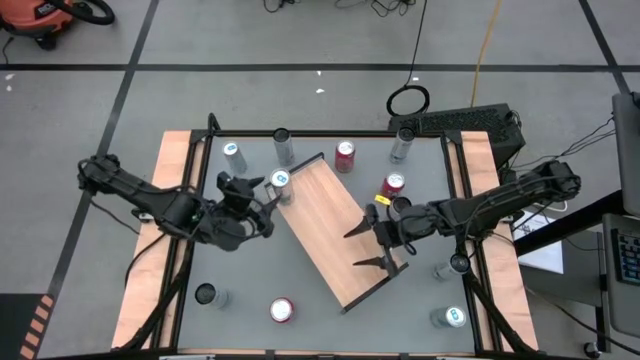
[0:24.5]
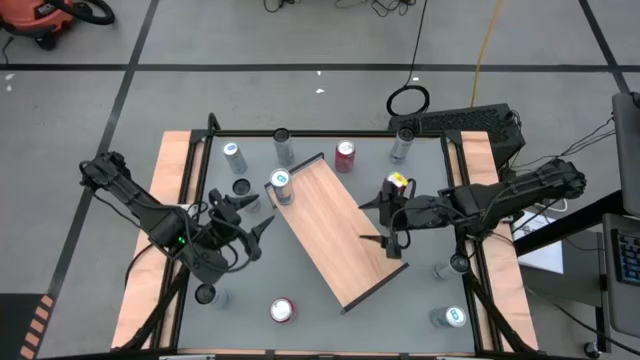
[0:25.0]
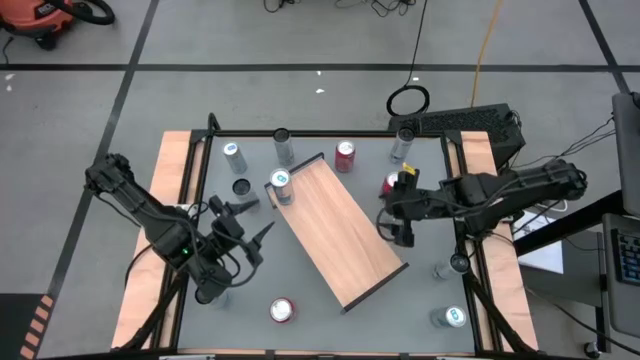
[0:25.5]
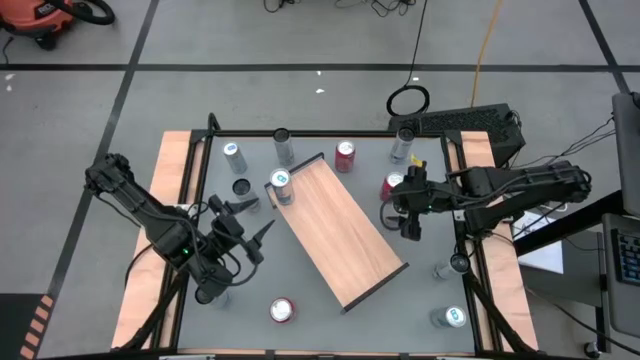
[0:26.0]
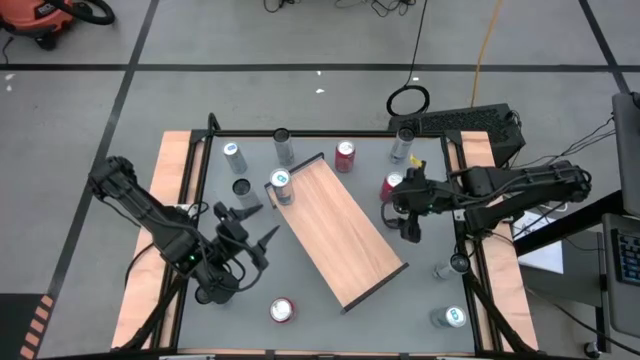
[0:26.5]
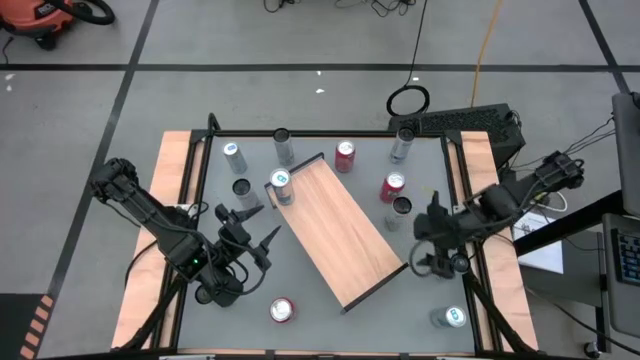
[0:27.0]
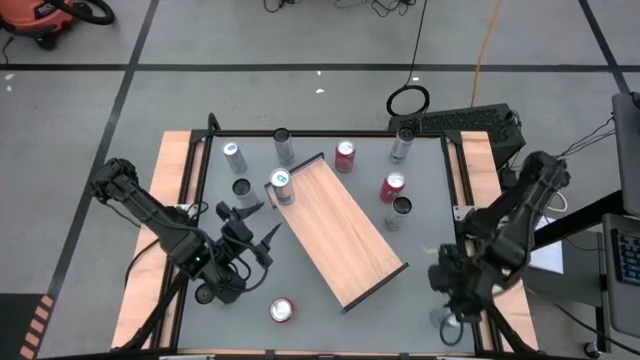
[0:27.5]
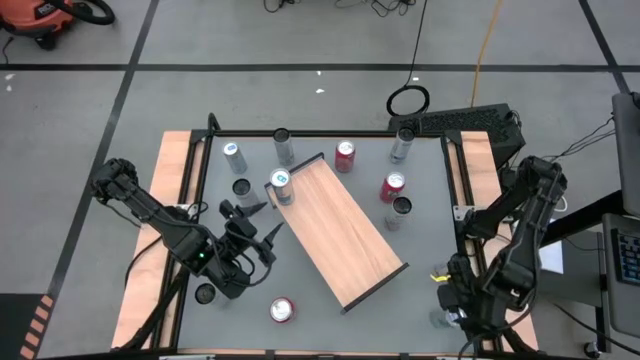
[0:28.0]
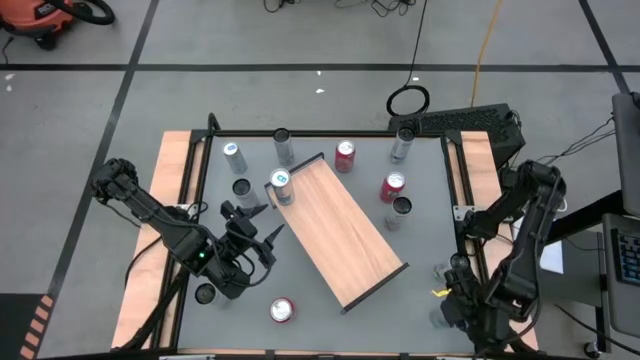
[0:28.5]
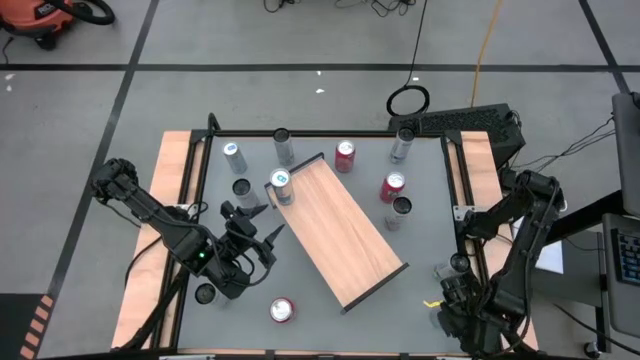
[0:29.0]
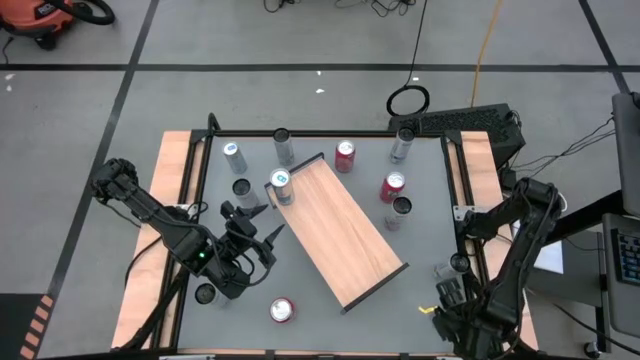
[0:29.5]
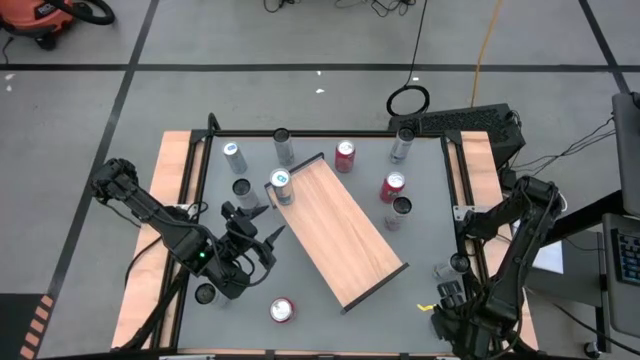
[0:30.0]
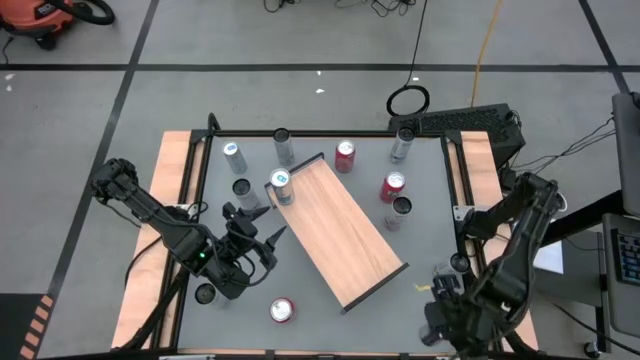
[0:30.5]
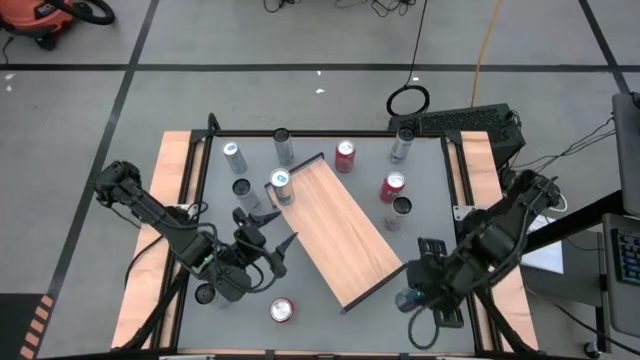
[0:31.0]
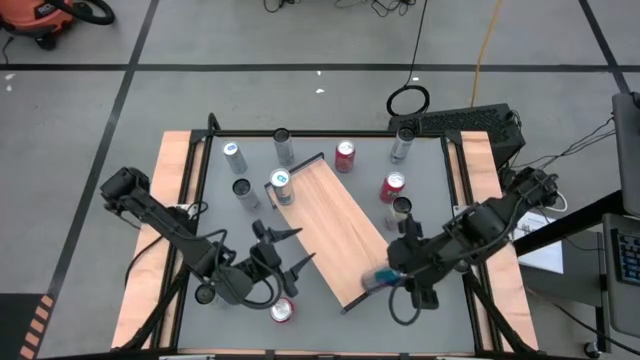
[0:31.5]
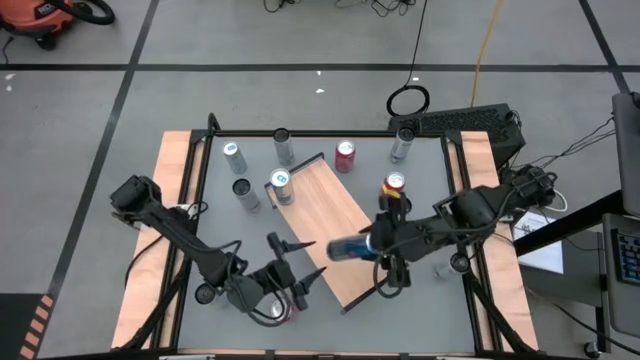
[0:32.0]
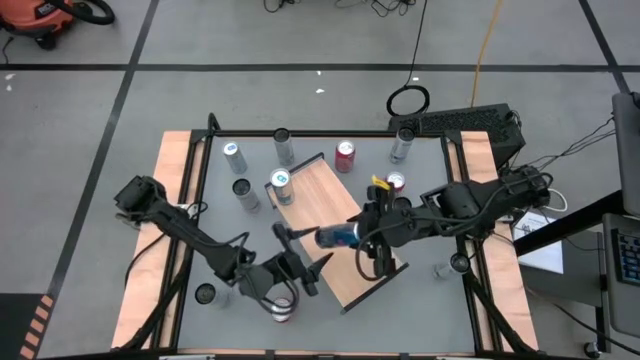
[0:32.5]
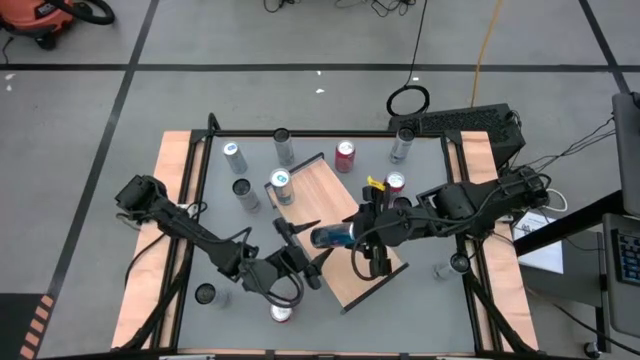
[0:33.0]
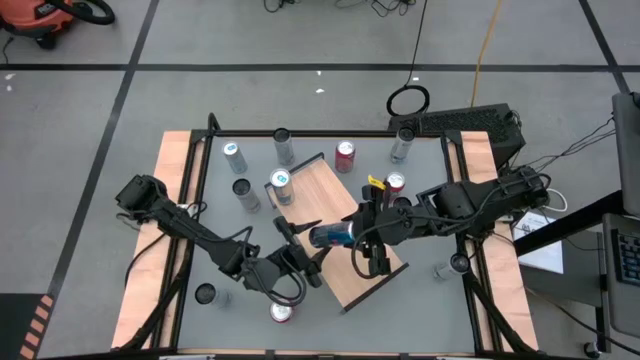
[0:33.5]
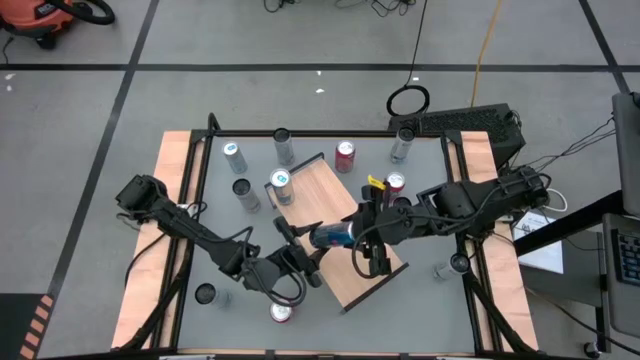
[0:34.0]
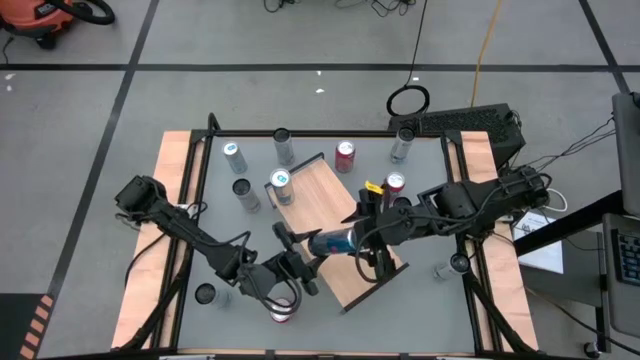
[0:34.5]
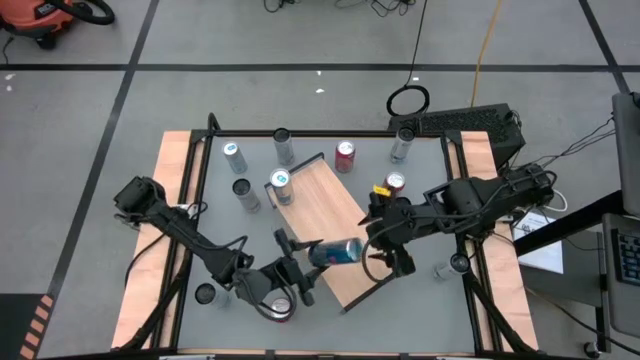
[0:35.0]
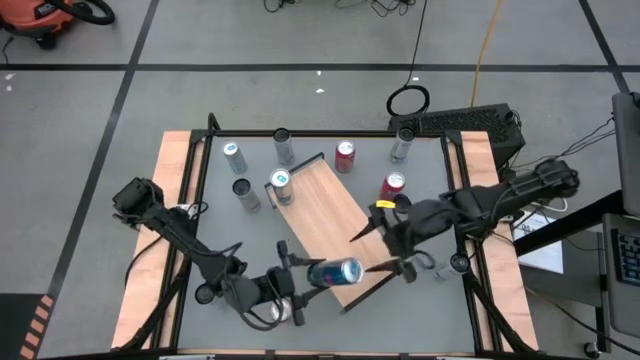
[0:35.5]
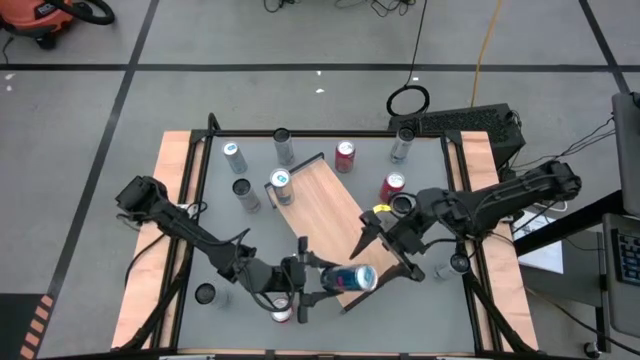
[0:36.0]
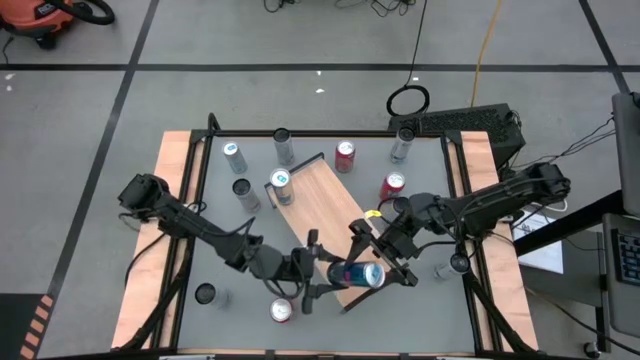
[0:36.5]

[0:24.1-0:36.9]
Task: Place canned beverage on shelf
Put the bottom silver soda can on the shelf aligned with the other silver soda can

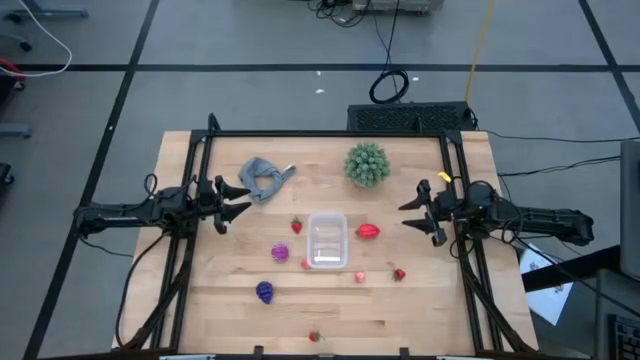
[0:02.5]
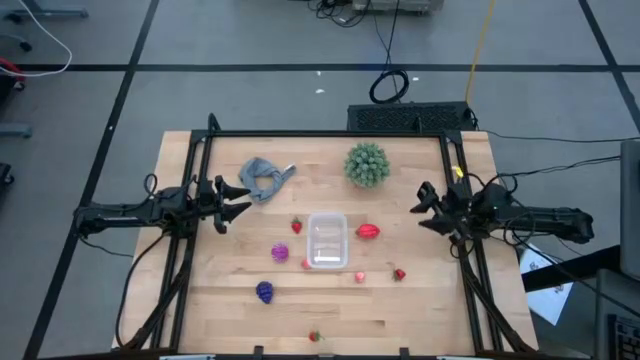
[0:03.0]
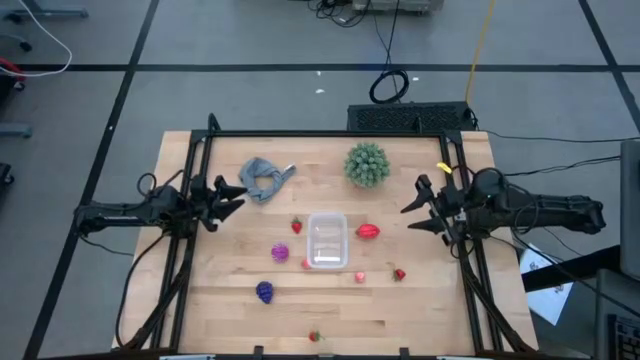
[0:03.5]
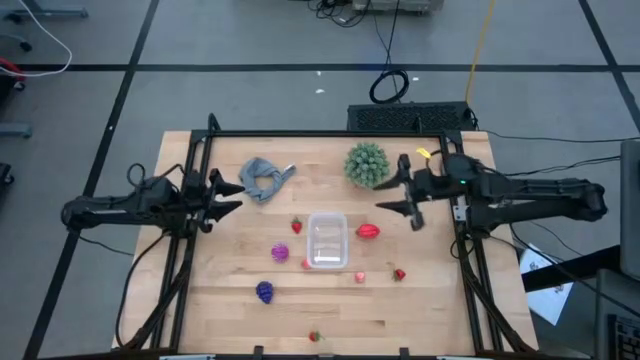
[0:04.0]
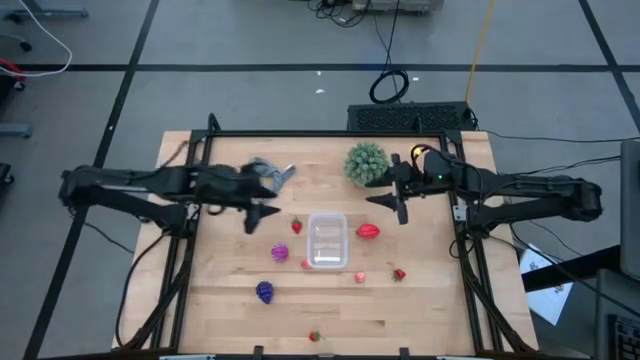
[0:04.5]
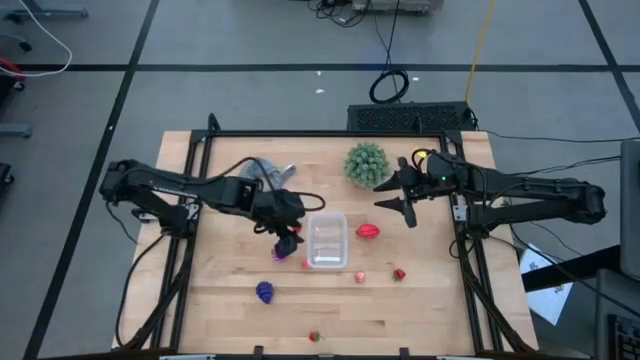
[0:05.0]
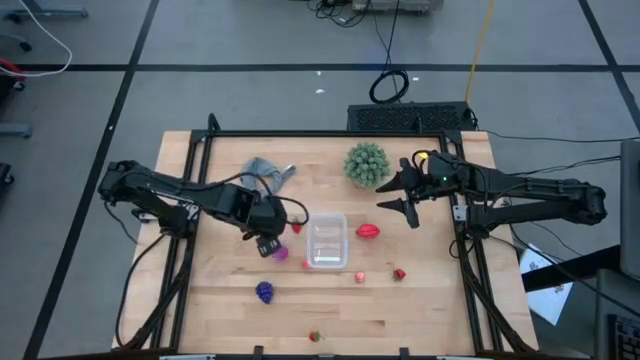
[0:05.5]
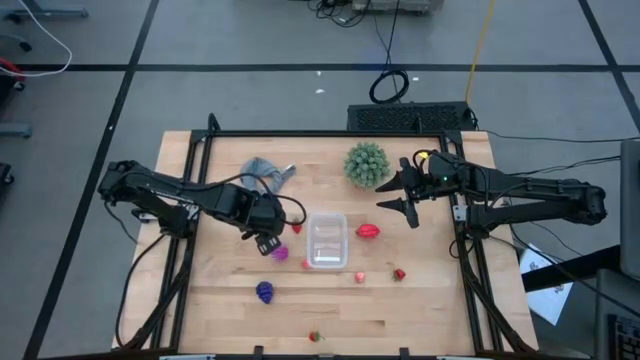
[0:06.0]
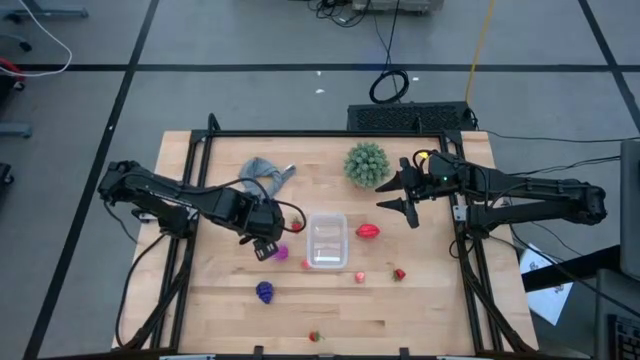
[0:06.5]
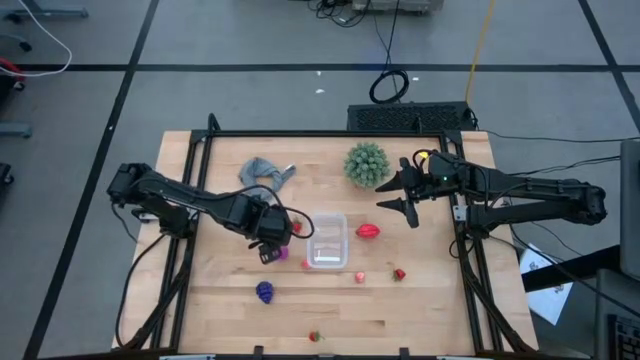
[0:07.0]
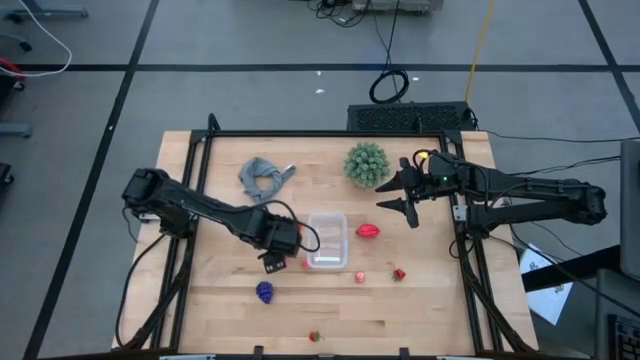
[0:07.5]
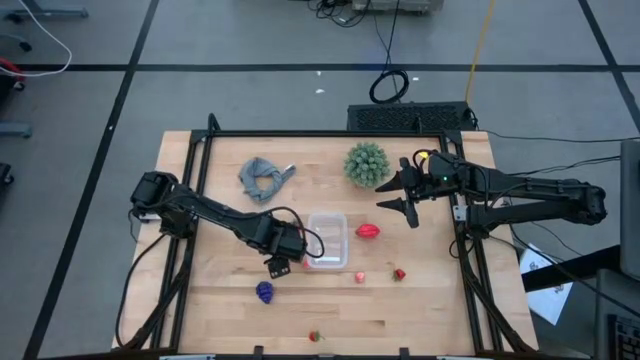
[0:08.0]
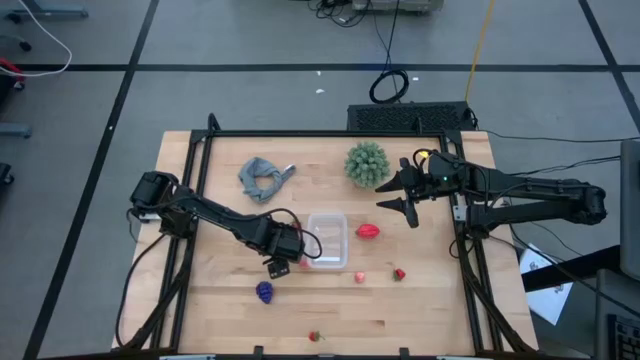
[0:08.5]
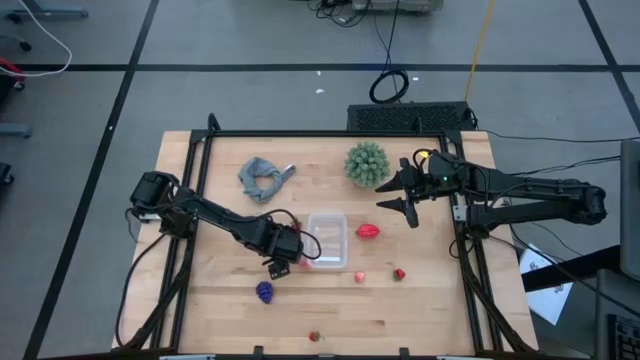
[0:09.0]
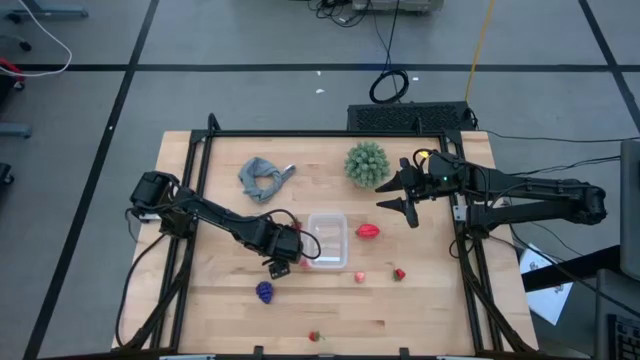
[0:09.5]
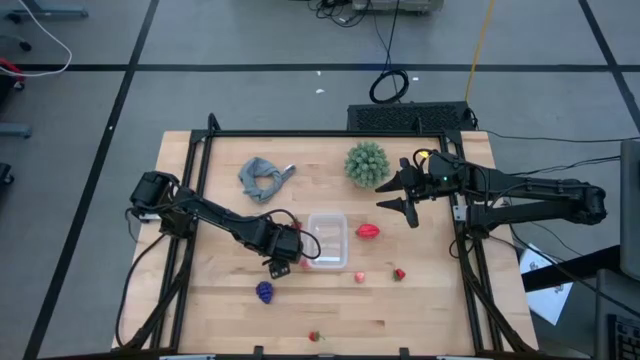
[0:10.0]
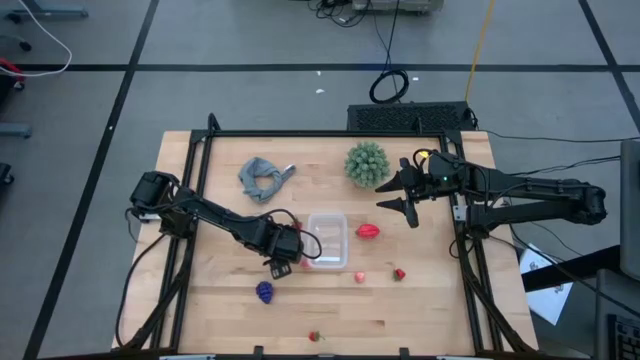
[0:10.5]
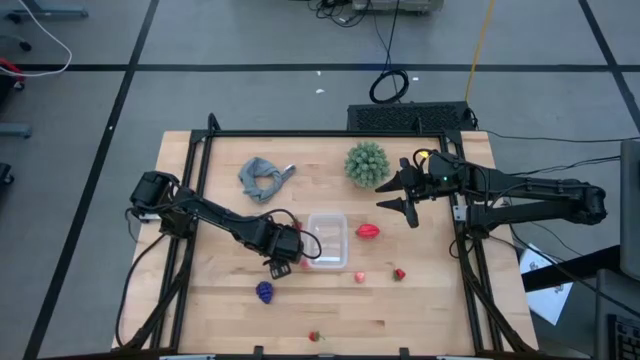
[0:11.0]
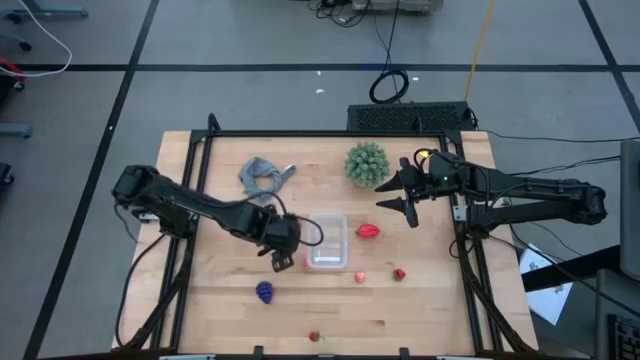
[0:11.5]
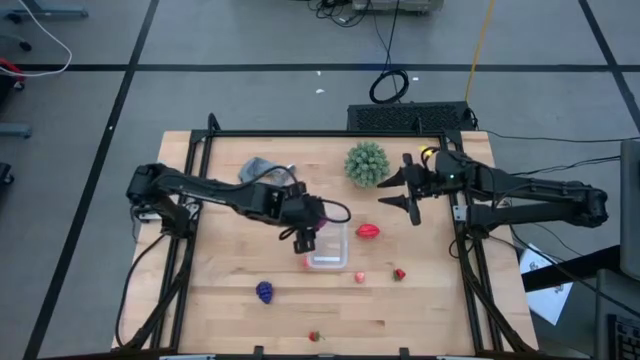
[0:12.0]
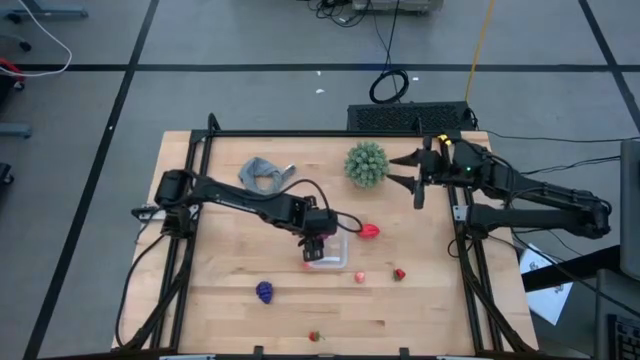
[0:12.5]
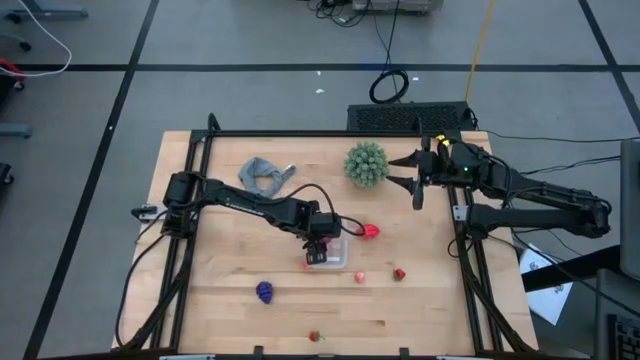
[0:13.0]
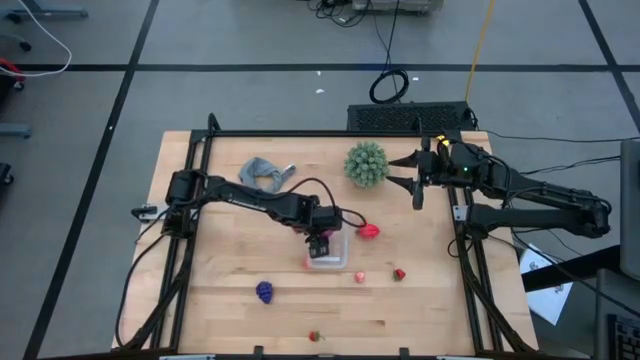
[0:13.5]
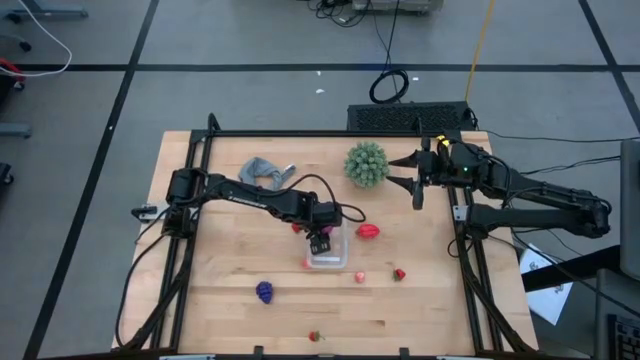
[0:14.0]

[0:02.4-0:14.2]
Task: Pick and placing Produce into tupperware
Put the onion into the transparent bin
